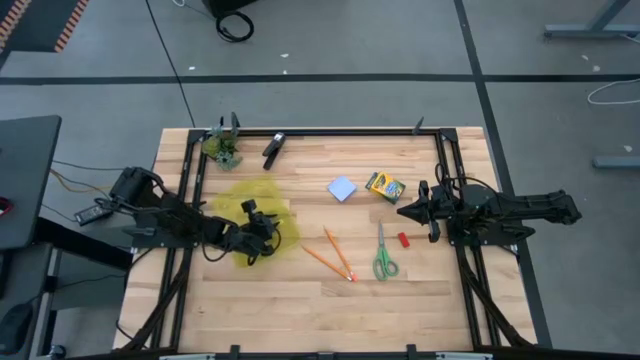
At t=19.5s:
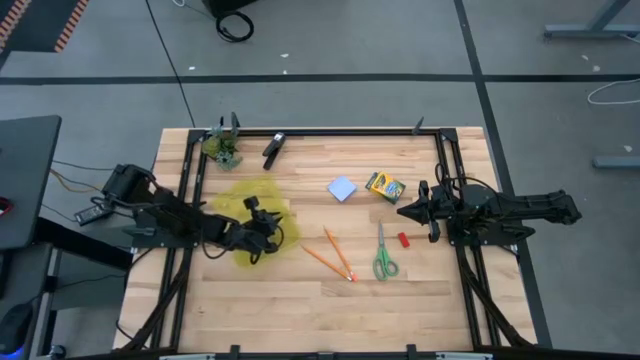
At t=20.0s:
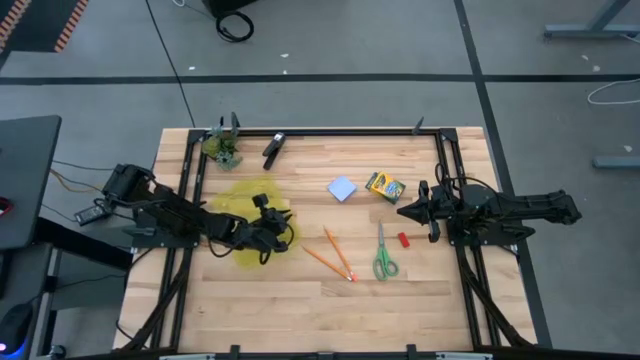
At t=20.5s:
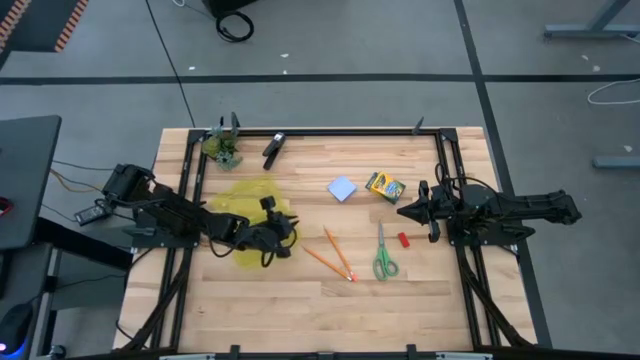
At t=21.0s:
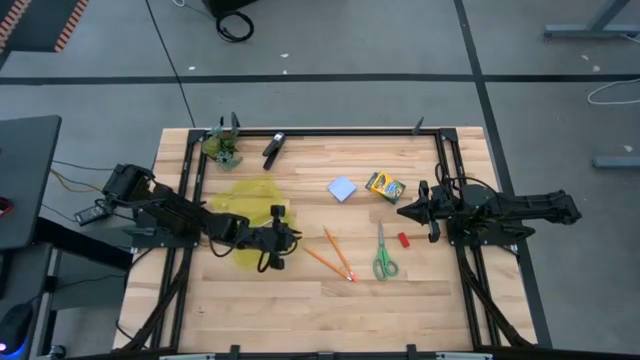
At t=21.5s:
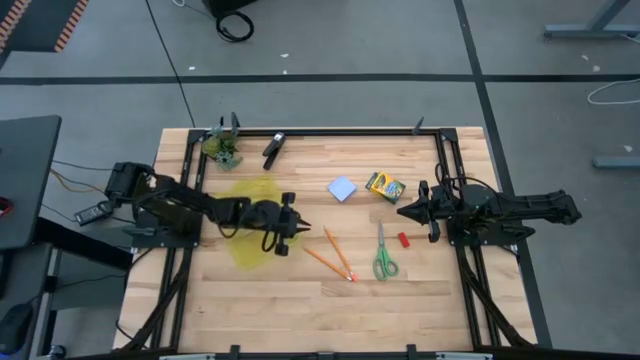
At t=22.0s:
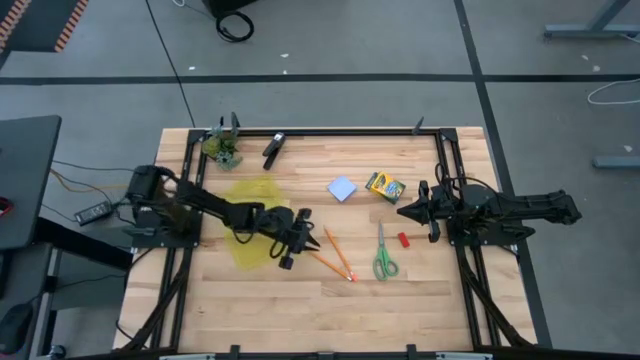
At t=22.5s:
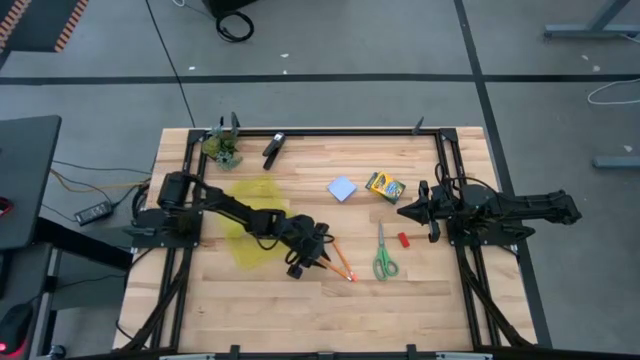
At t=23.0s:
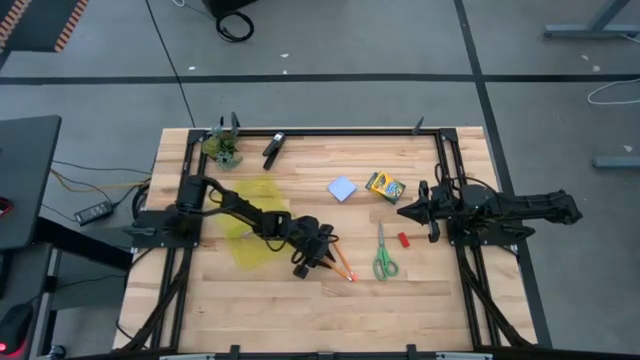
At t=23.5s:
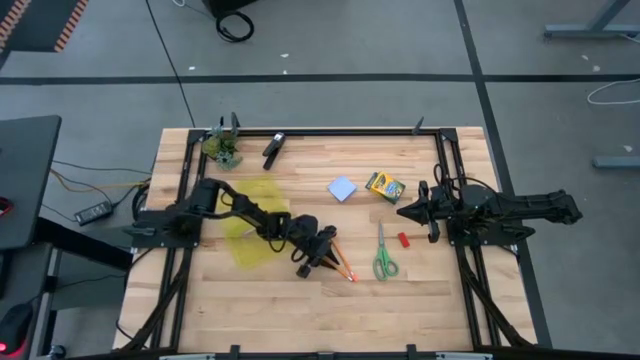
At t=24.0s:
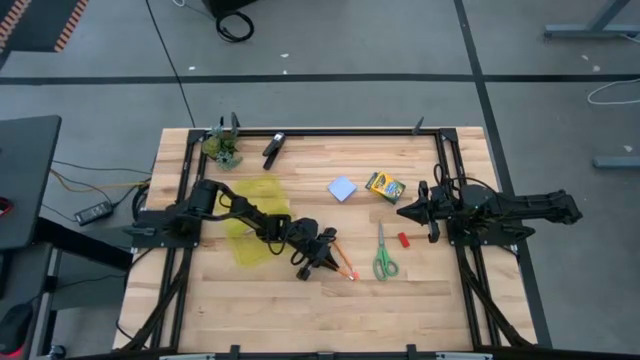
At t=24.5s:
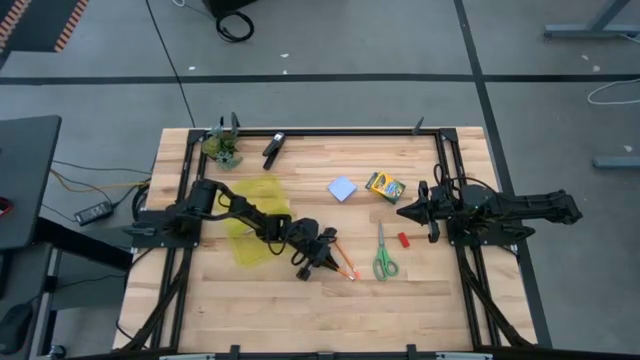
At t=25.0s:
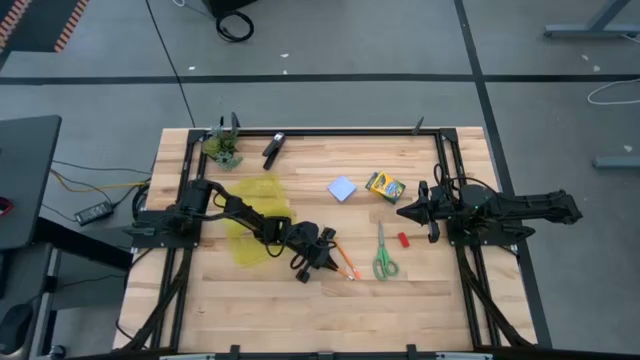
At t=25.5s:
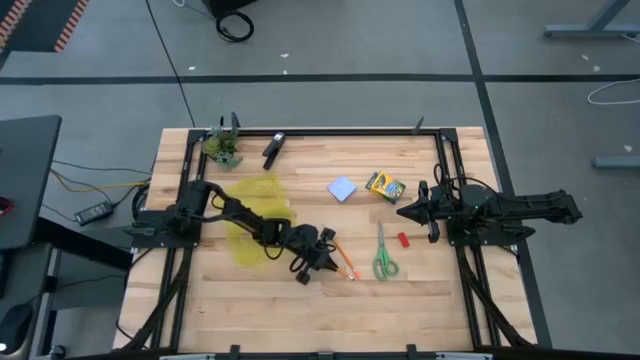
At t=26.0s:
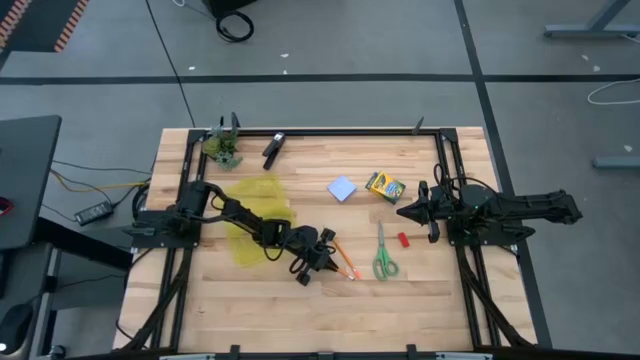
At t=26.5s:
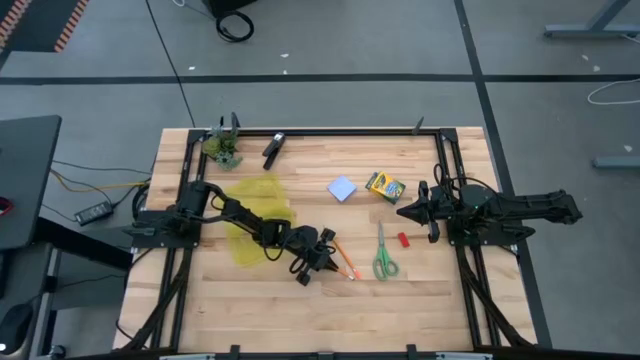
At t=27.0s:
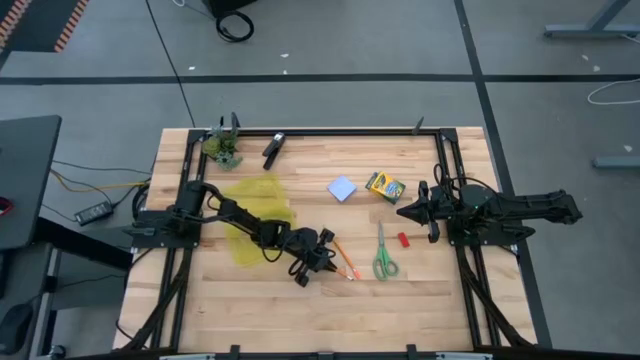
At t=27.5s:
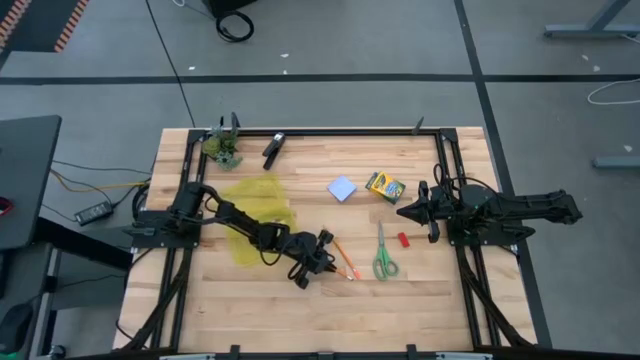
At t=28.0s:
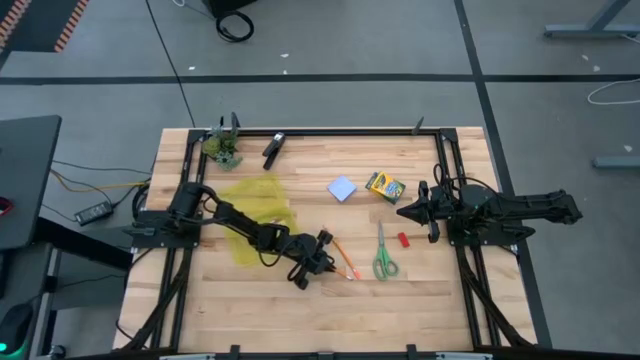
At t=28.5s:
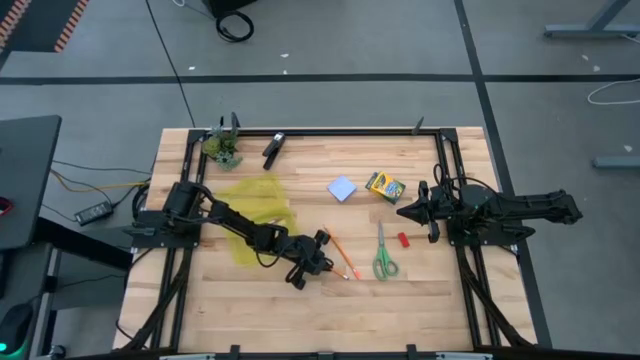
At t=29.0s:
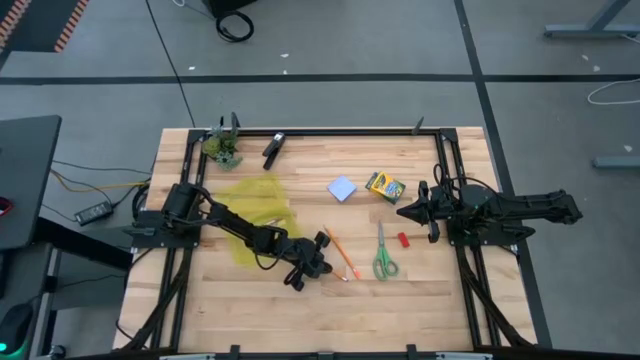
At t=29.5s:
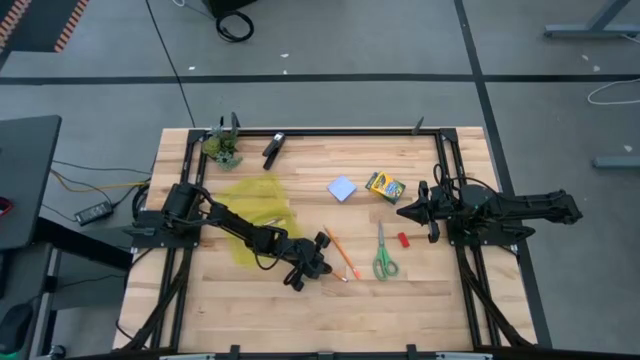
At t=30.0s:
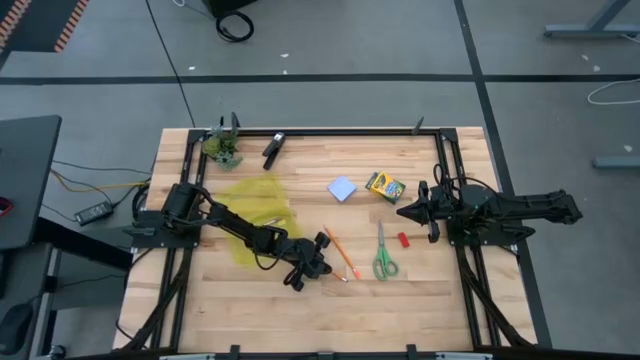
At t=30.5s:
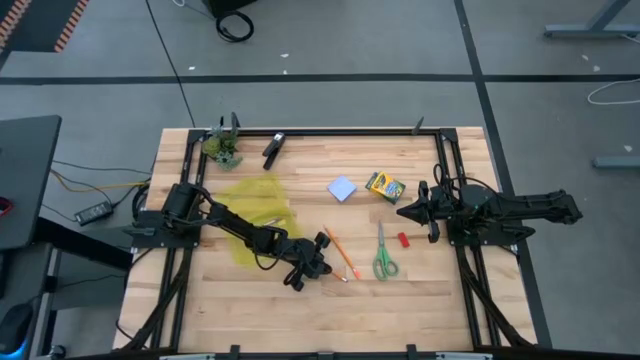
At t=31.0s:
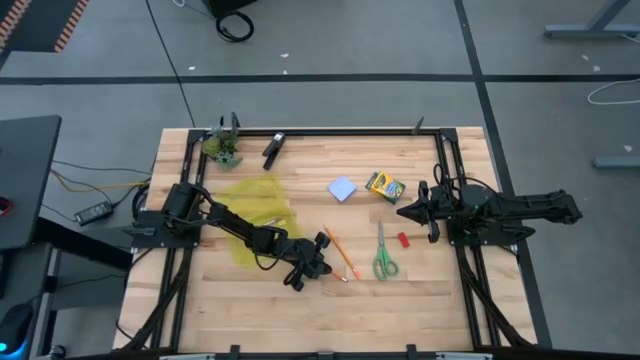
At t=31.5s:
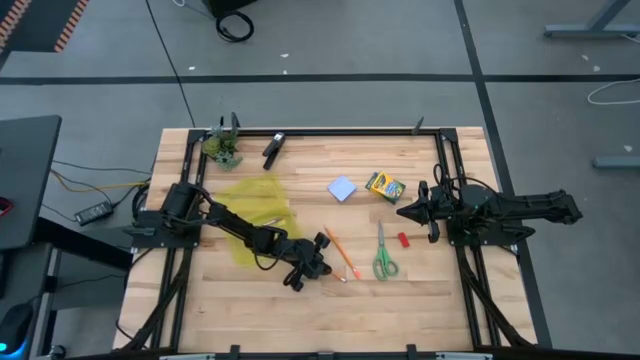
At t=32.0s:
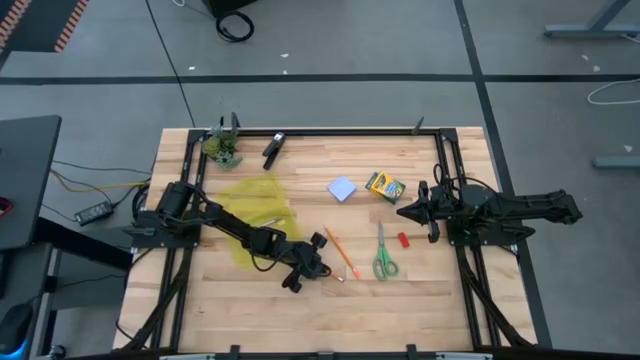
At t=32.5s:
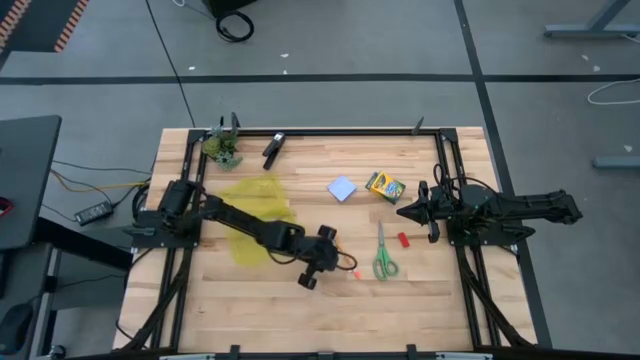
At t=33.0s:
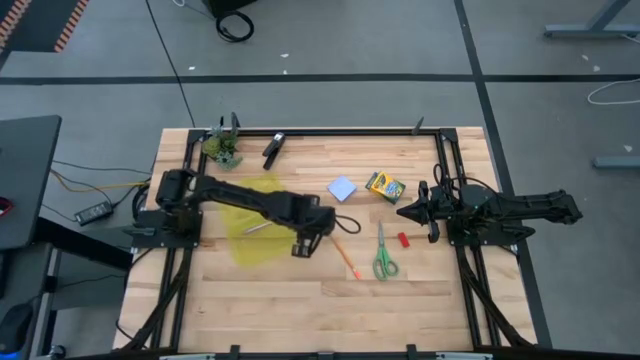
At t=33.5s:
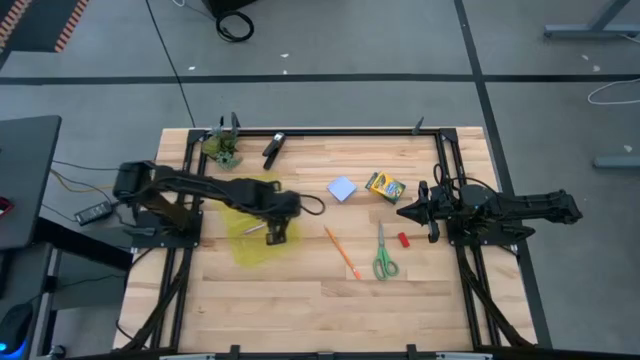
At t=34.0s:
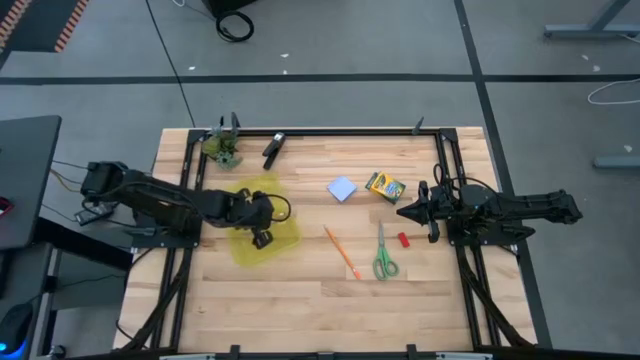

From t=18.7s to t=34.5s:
Task: Pack school essentials
Put the left orange pencil into the yellow supply box

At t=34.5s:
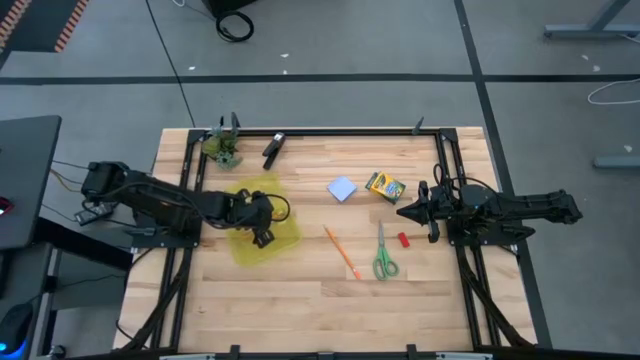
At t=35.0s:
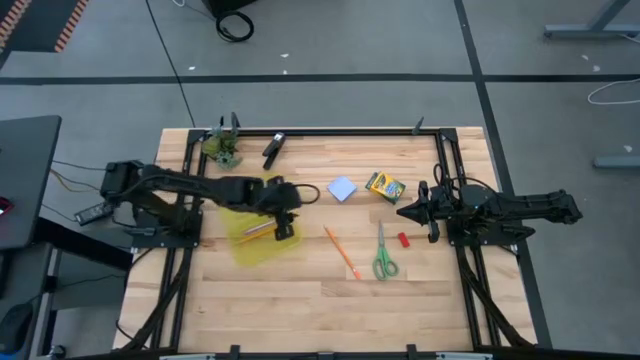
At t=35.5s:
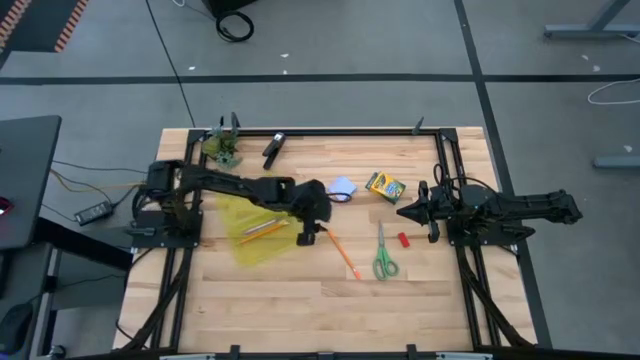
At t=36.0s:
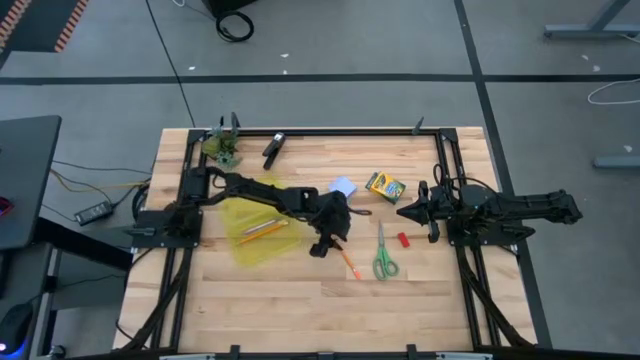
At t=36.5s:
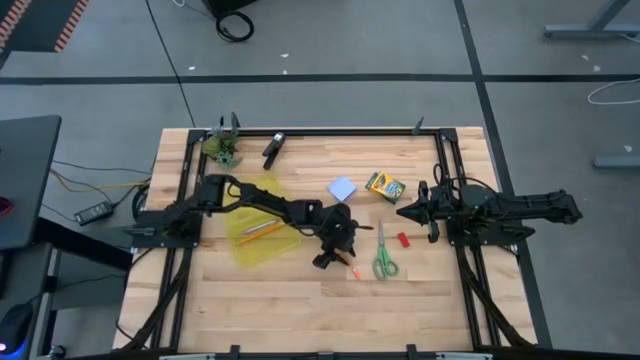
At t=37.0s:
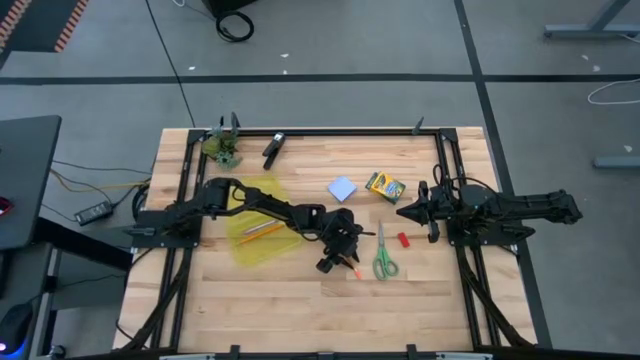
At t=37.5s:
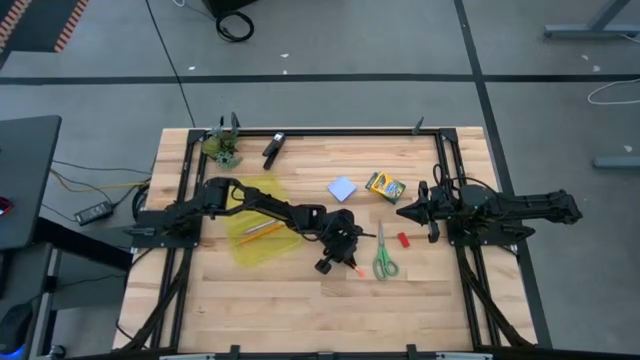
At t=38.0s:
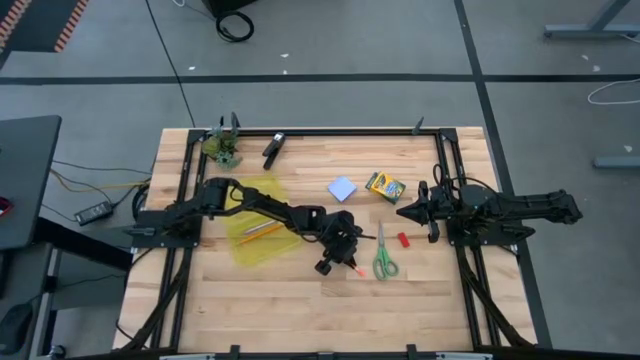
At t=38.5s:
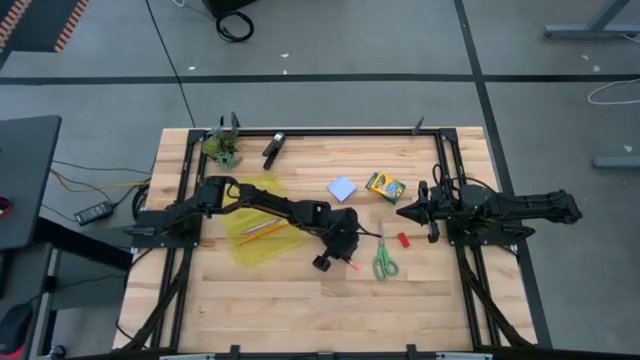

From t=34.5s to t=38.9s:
Put the orange pencil into the yellow supply box
